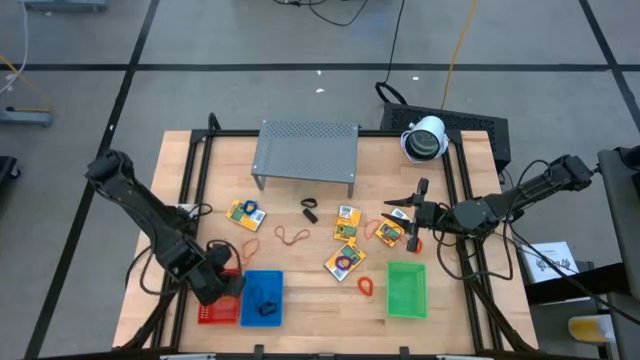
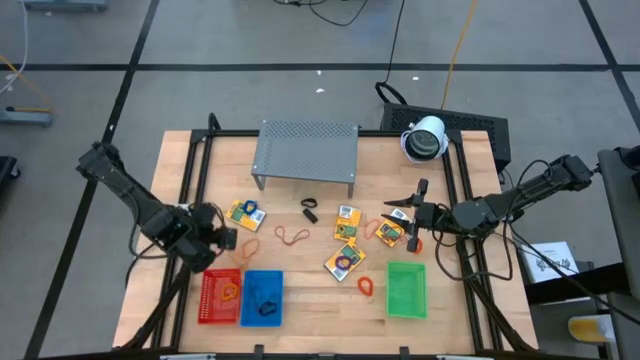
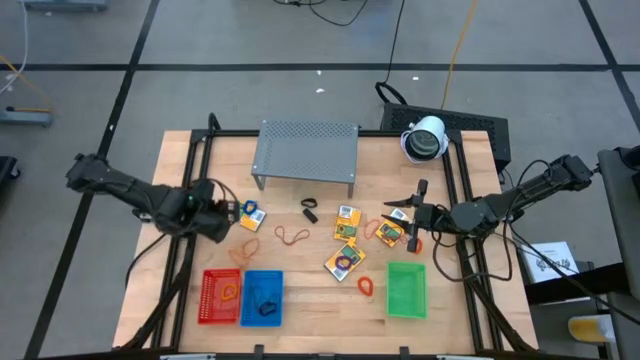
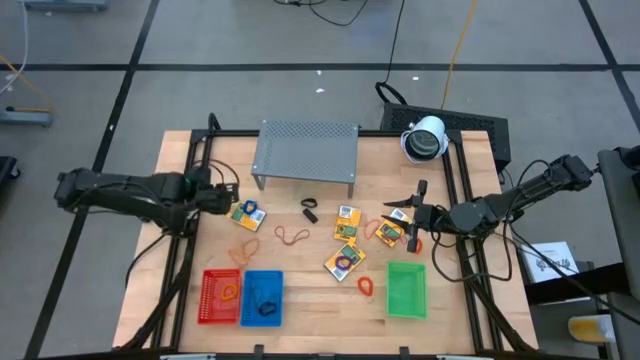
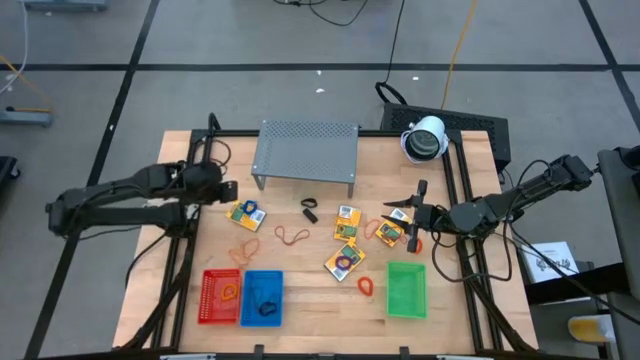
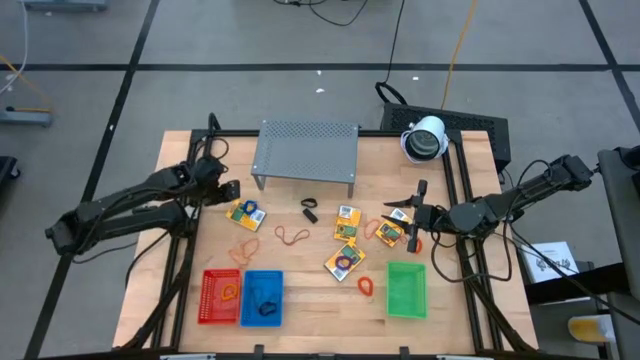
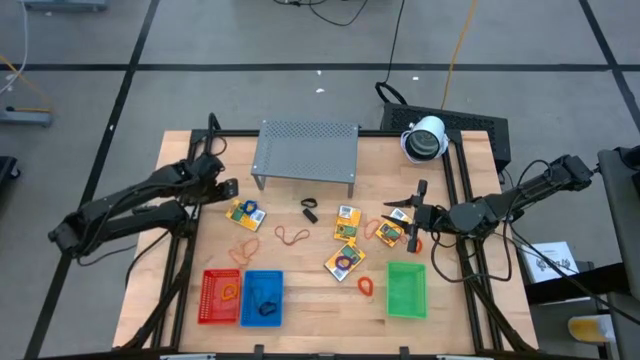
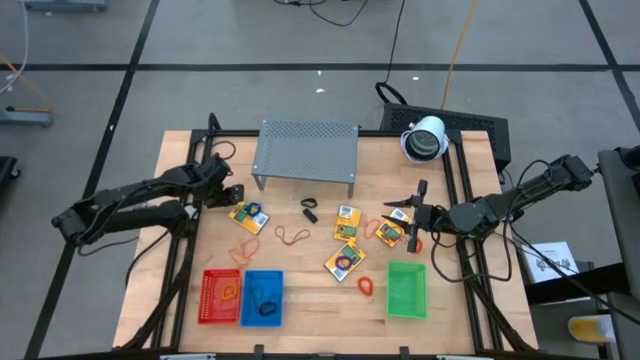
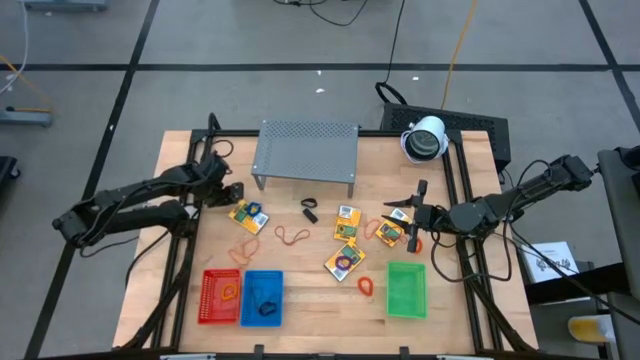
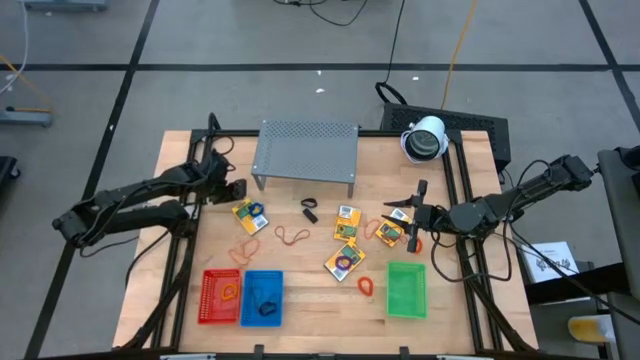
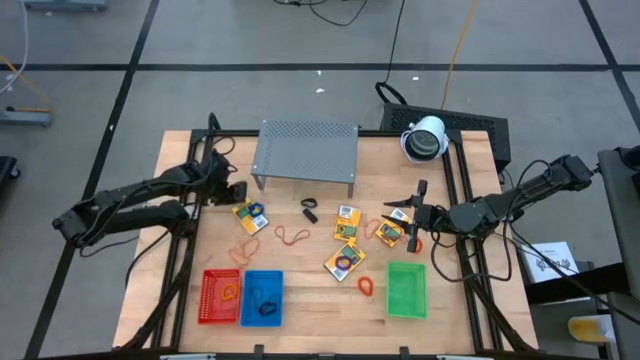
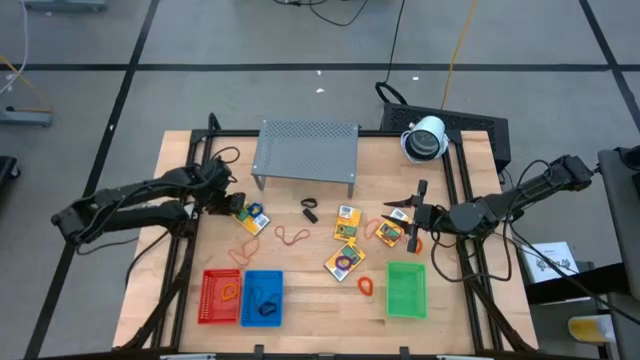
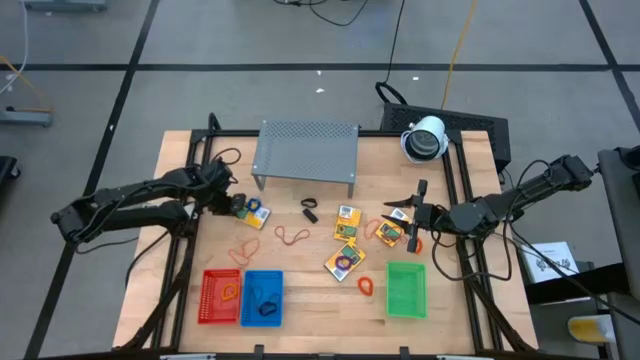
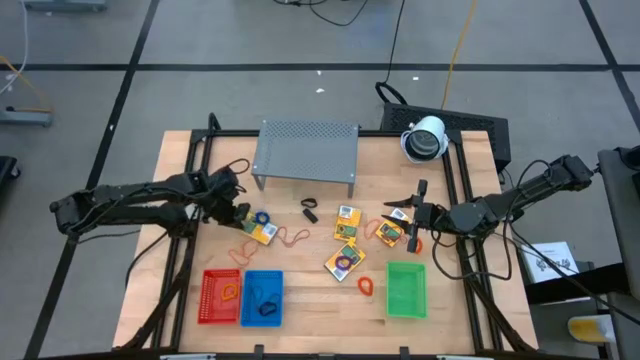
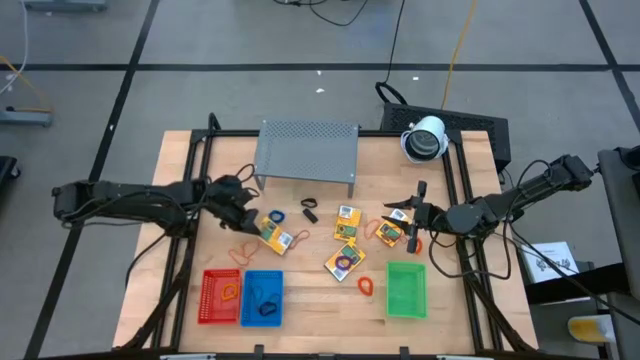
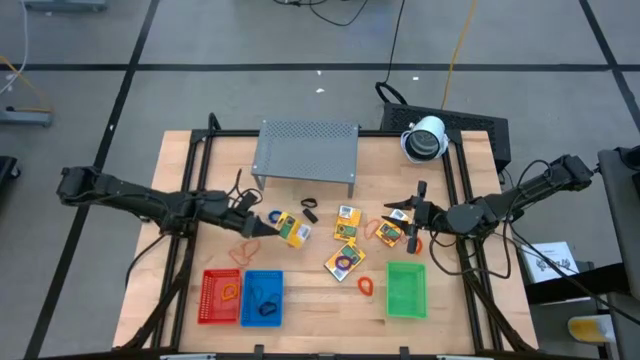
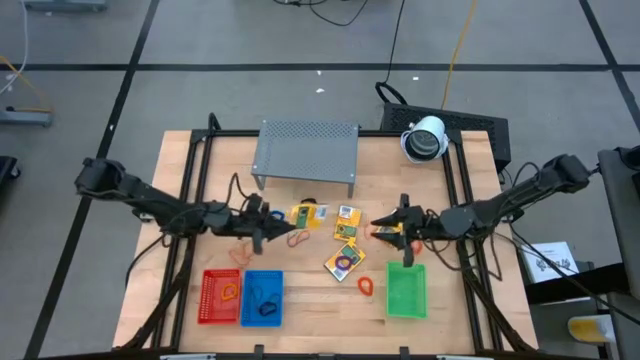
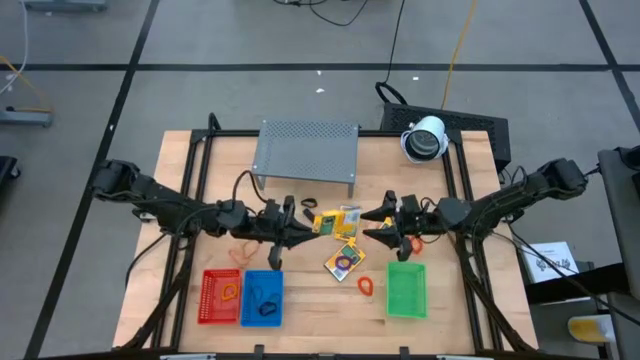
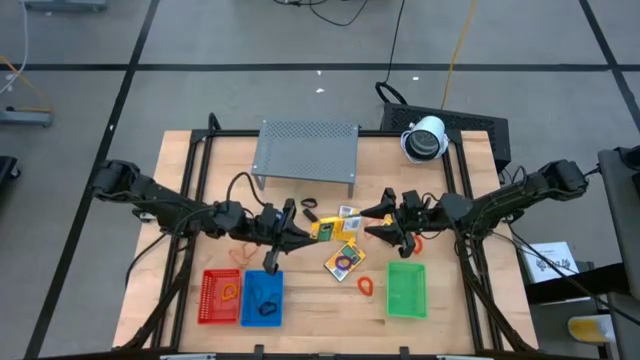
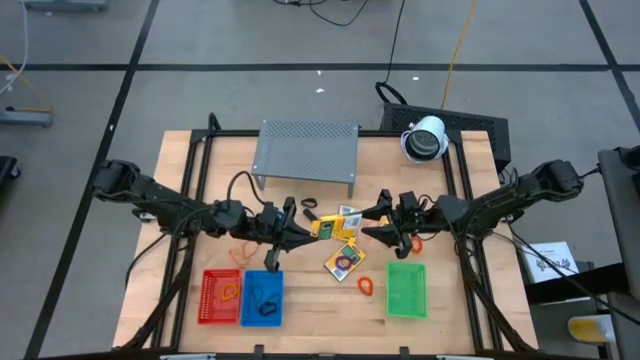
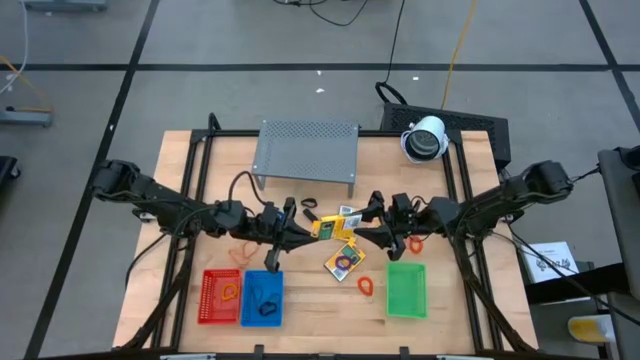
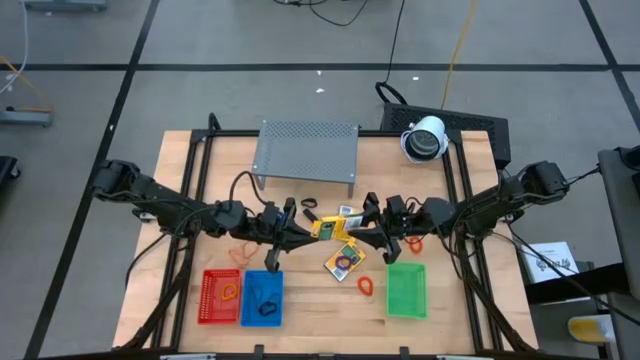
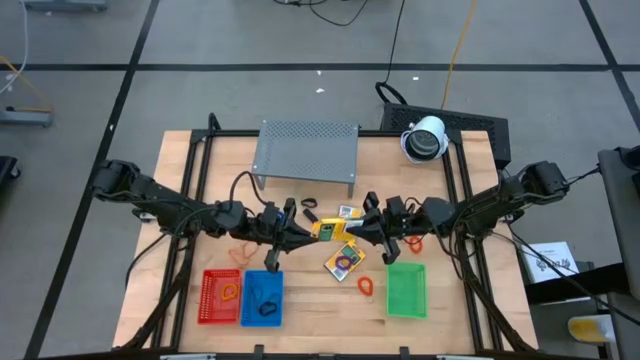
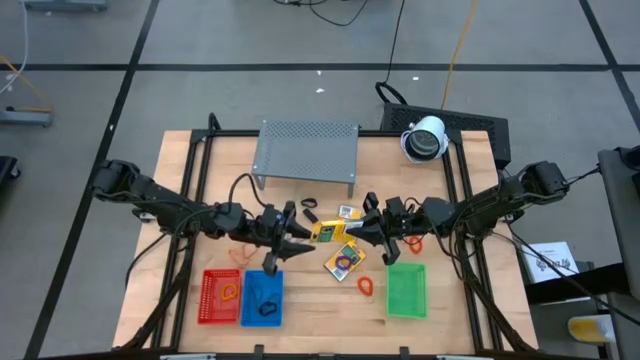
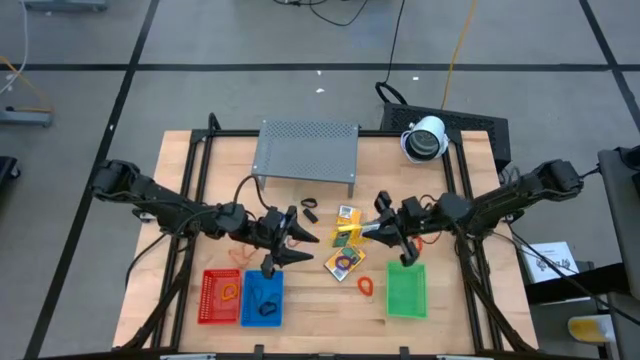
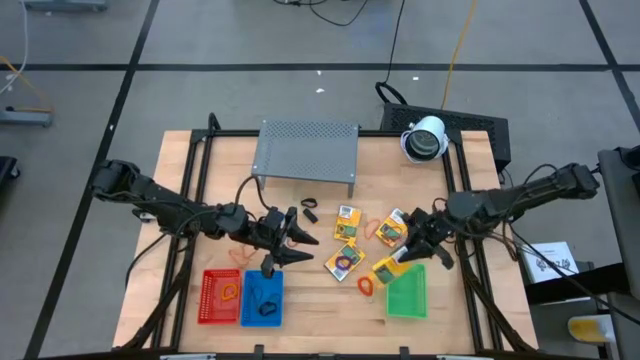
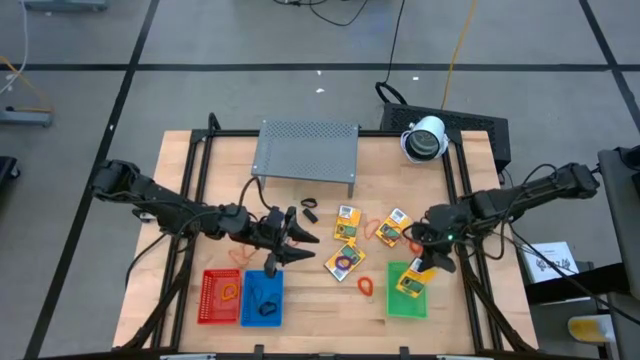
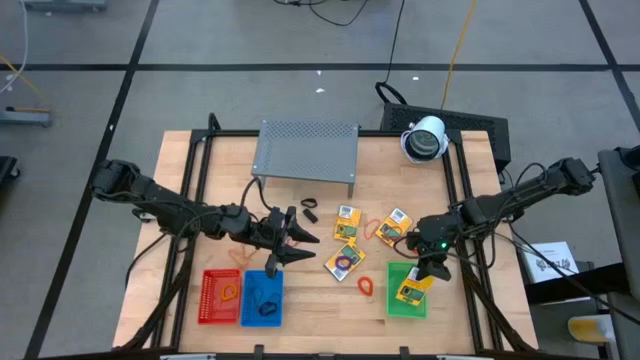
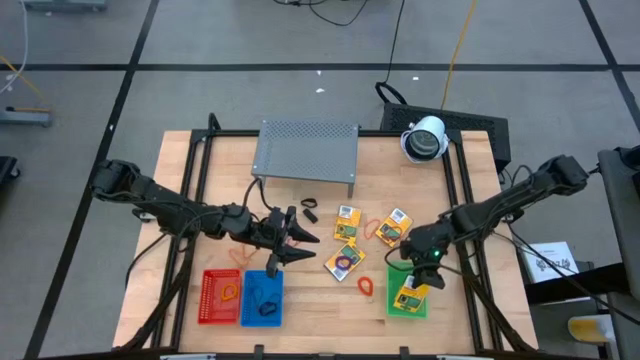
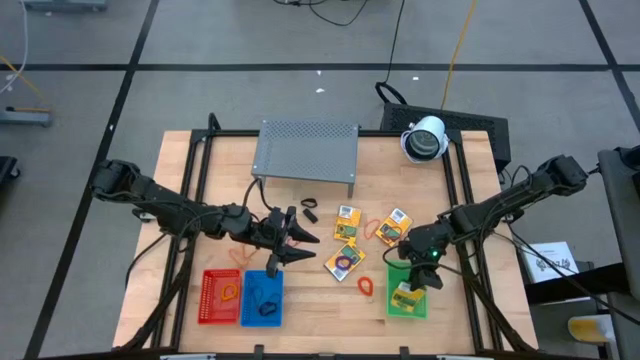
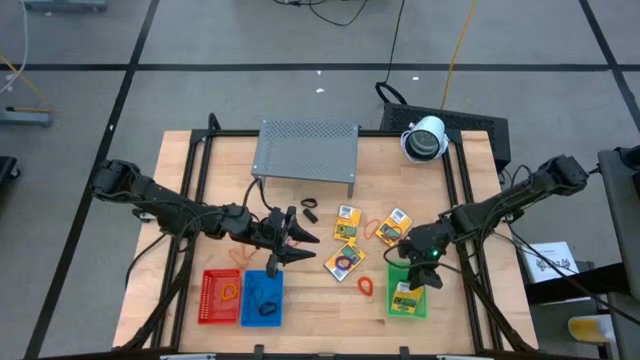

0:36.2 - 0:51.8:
Task: Pick & Place Office Desk Supplies
Put the yellow crayon box into the green bin

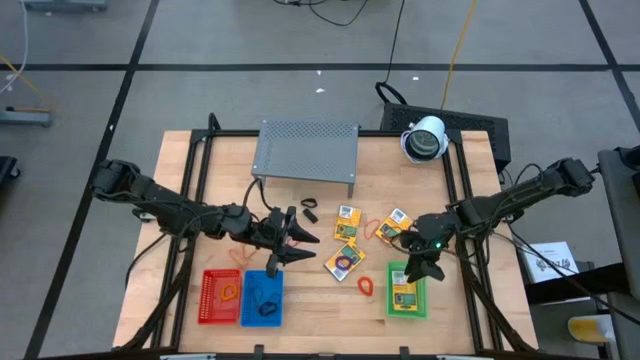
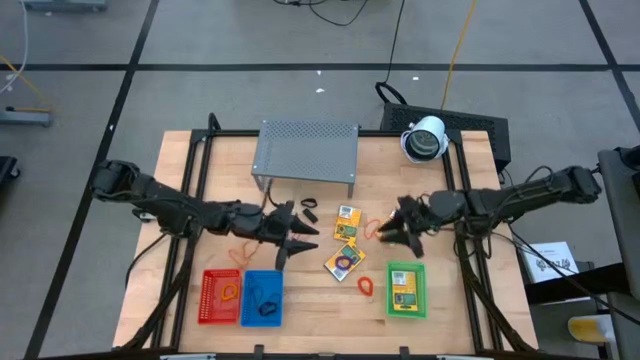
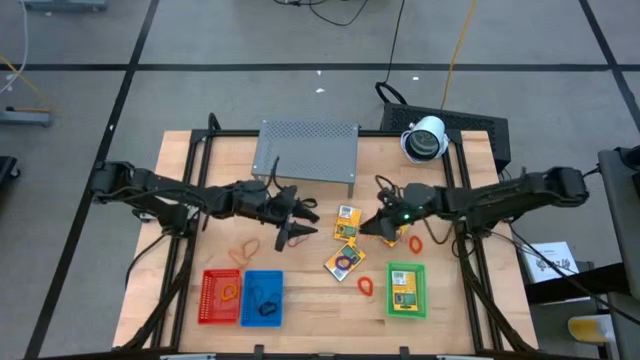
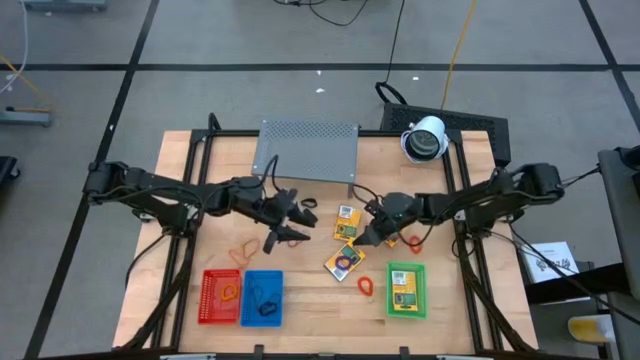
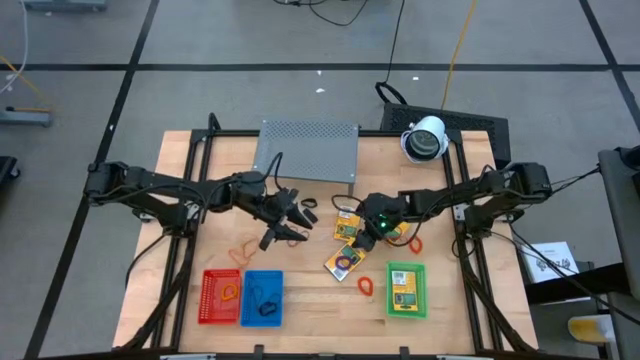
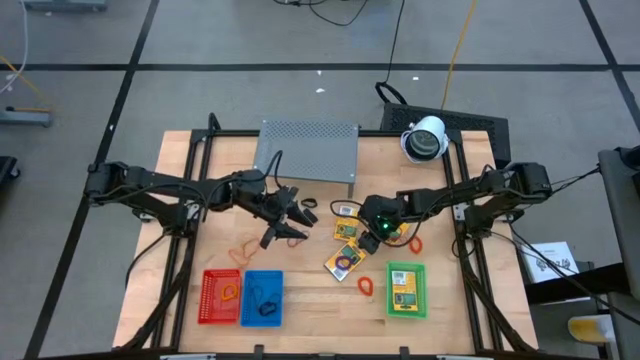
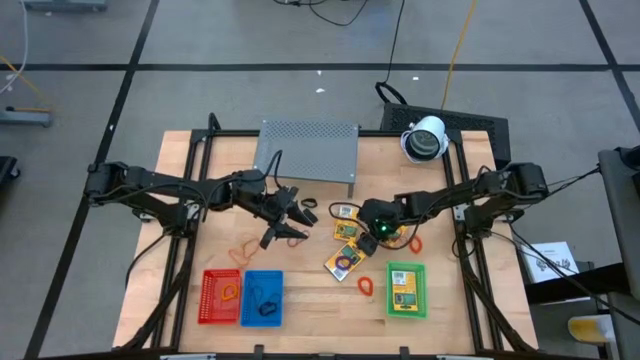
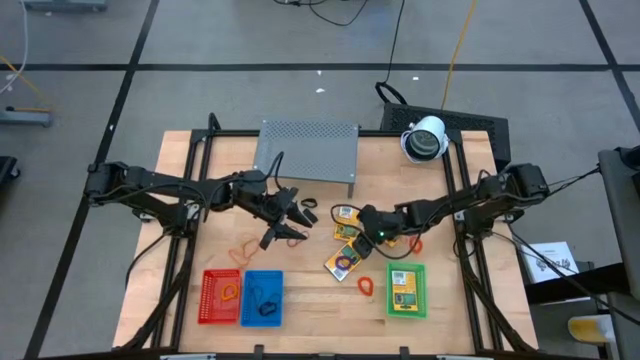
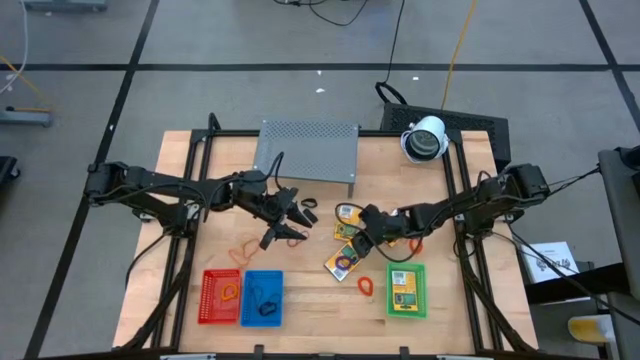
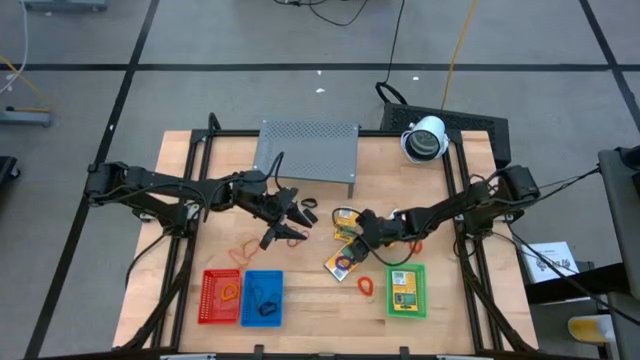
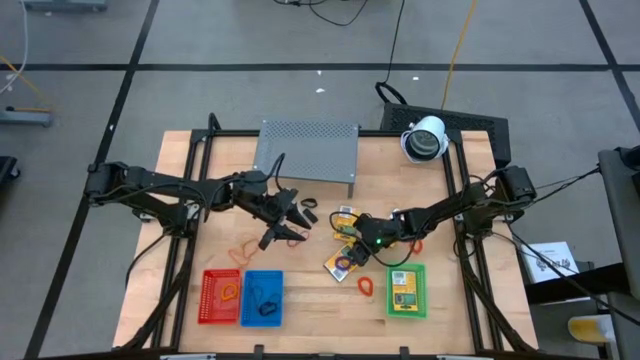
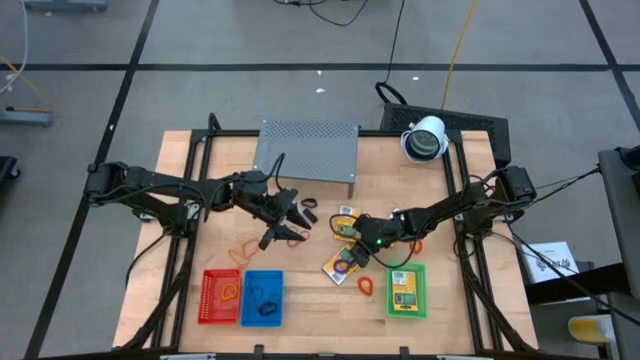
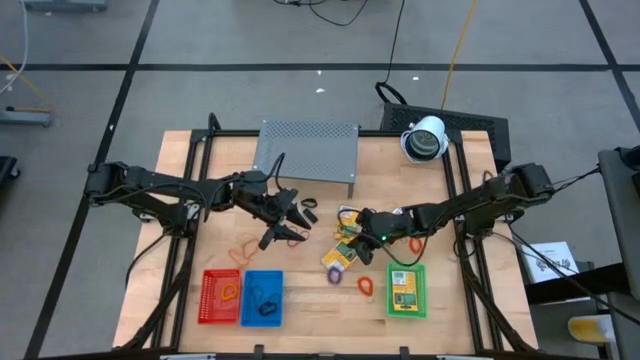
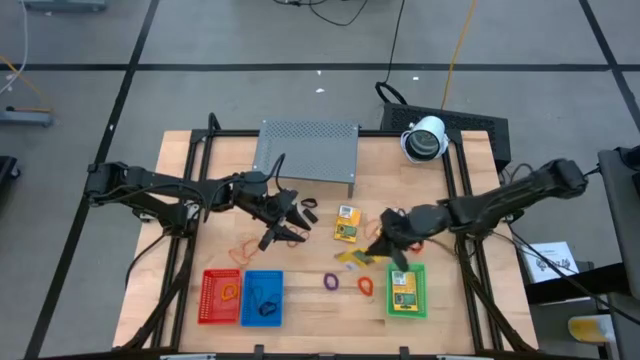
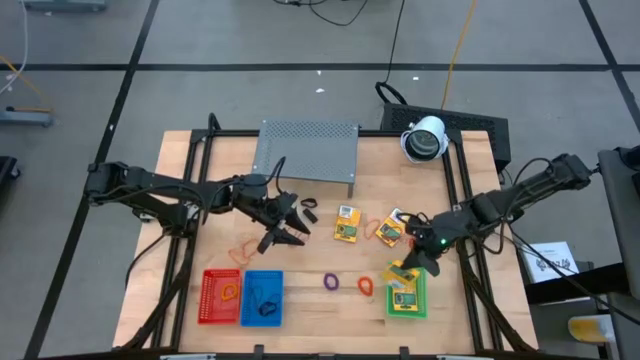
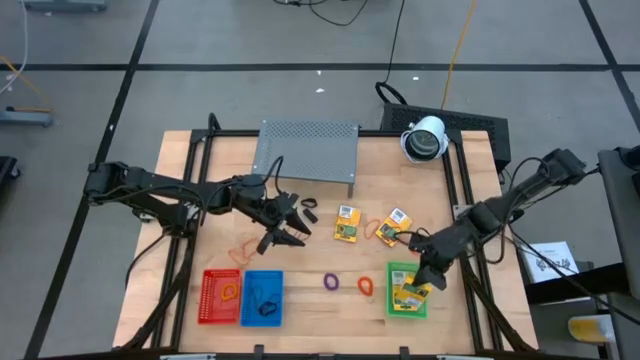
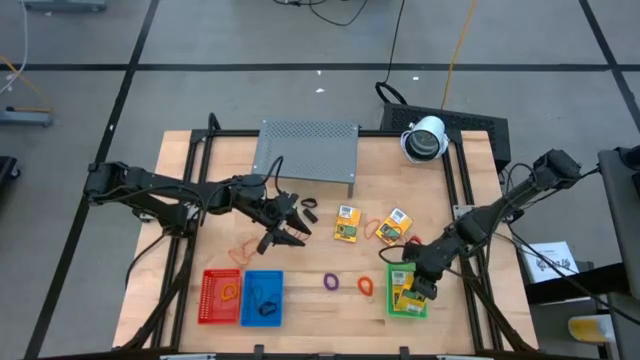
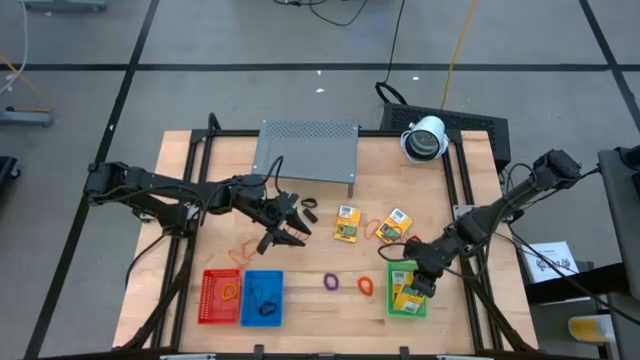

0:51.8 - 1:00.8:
Put the yellow crayon box into the green bin
